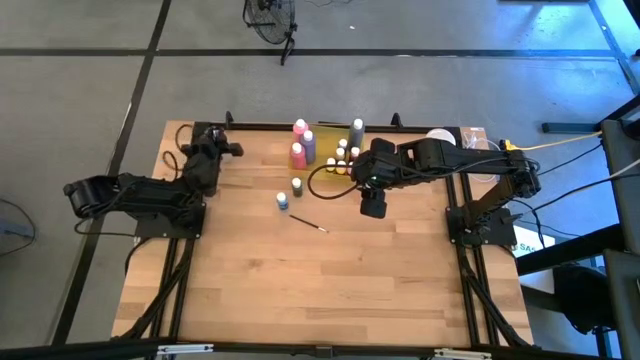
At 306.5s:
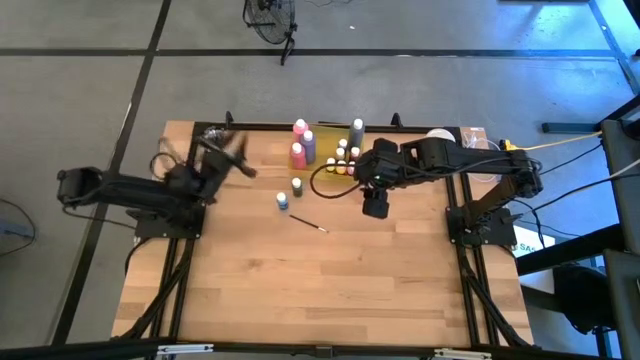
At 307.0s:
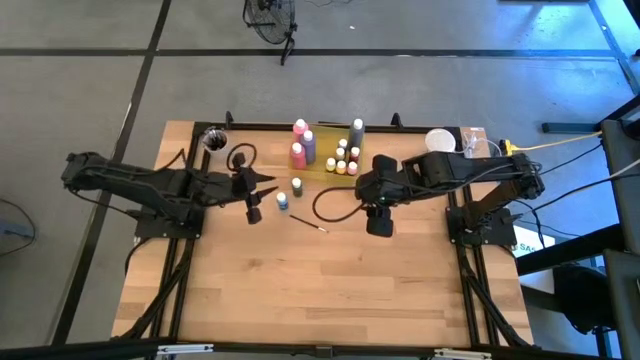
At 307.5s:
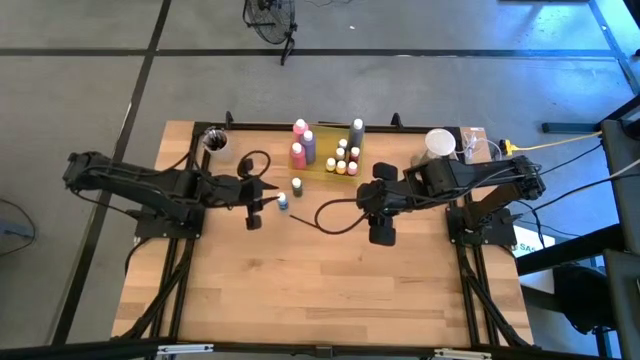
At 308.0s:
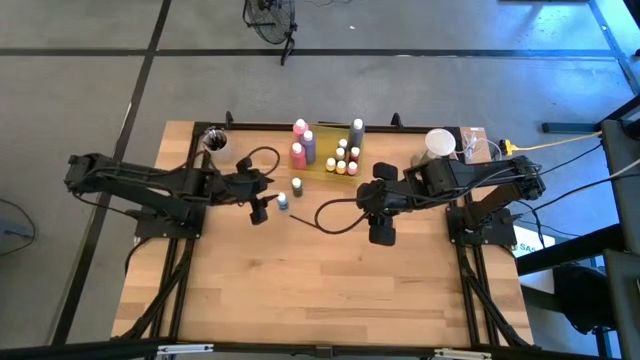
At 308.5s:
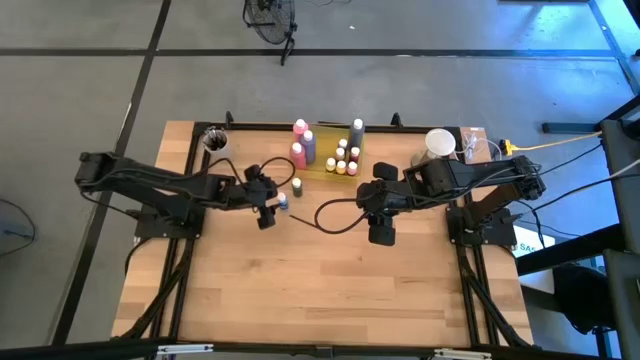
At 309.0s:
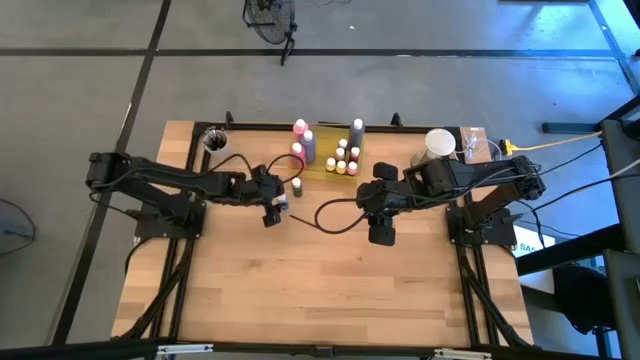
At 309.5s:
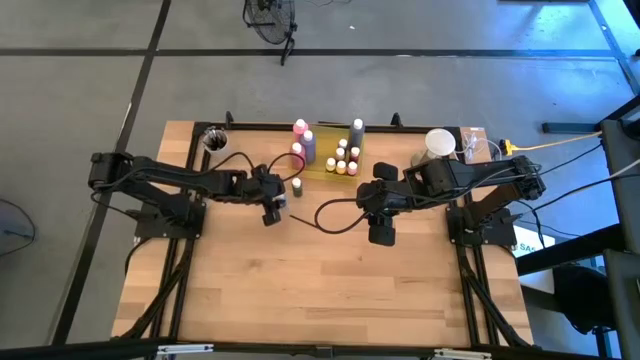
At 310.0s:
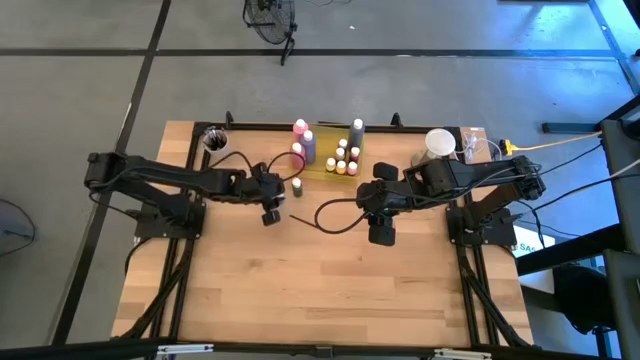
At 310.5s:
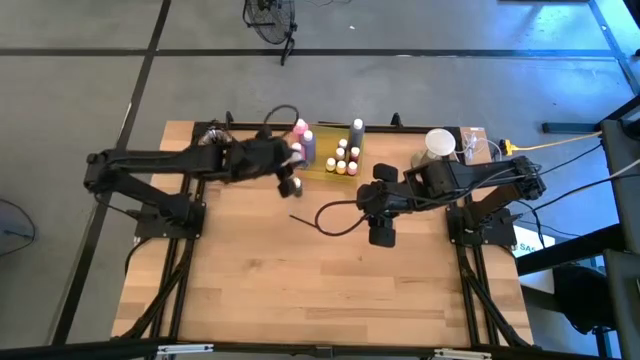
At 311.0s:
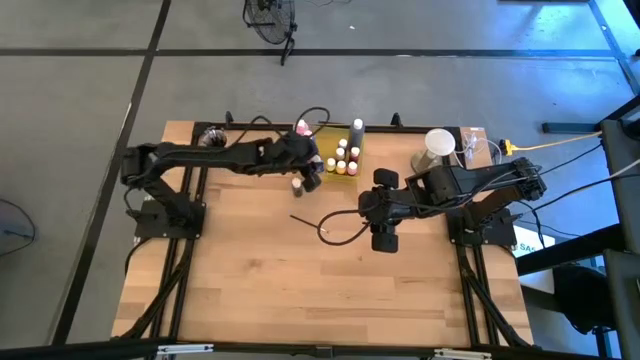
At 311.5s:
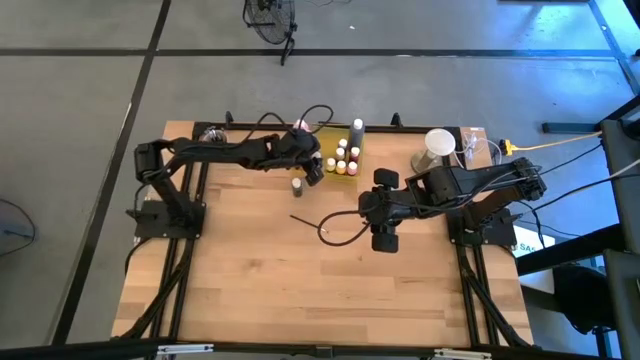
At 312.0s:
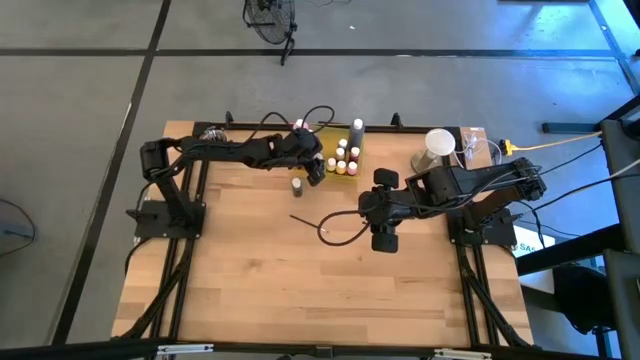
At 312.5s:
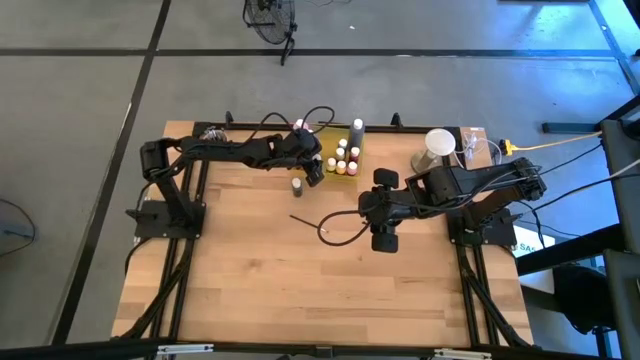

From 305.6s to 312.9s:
Task: Pick & Place Paint Supplies
Put the small light blue paint bottle into the yellow bin

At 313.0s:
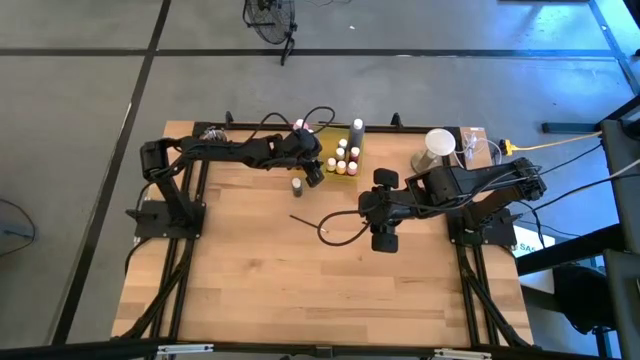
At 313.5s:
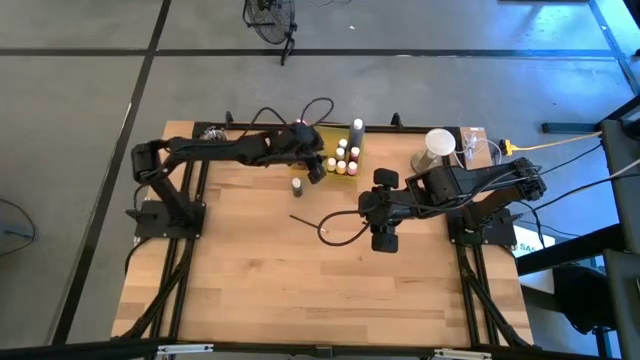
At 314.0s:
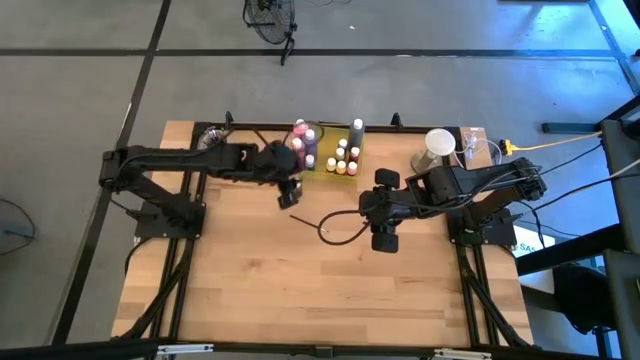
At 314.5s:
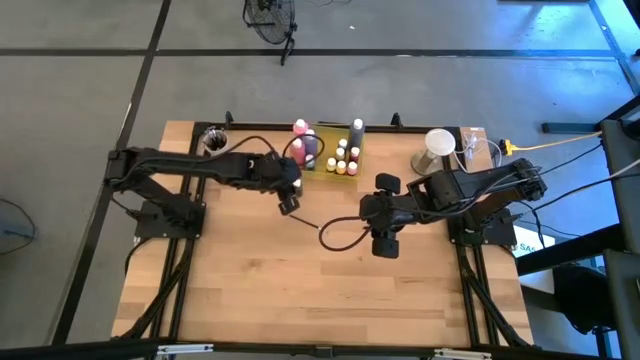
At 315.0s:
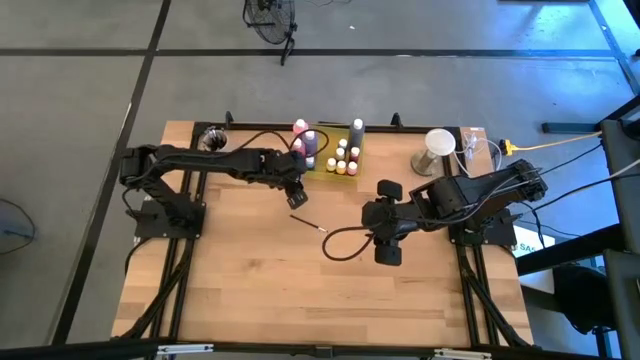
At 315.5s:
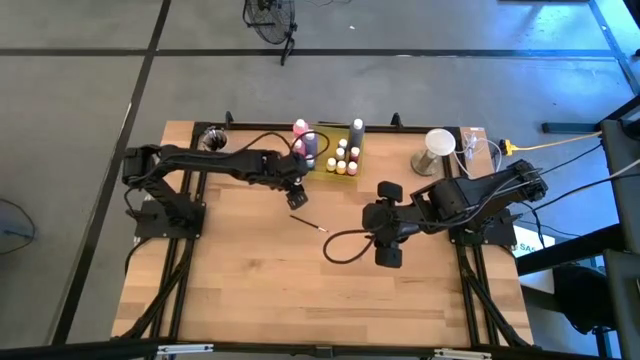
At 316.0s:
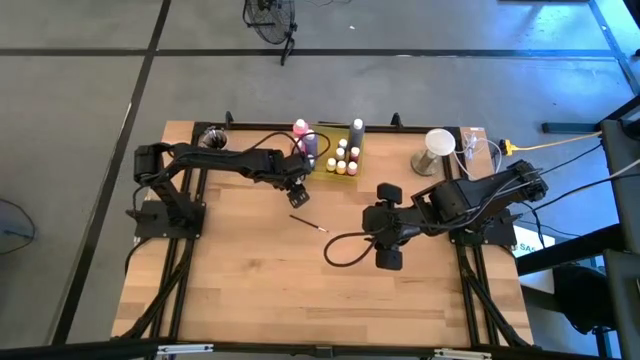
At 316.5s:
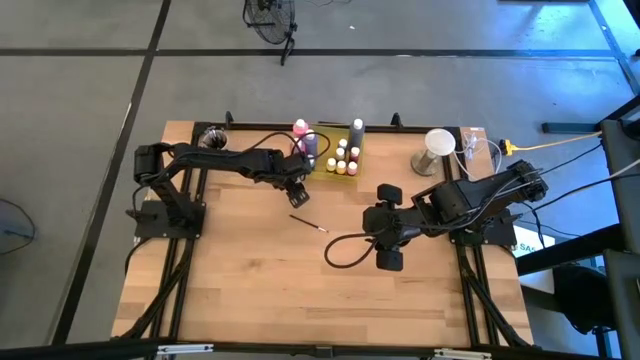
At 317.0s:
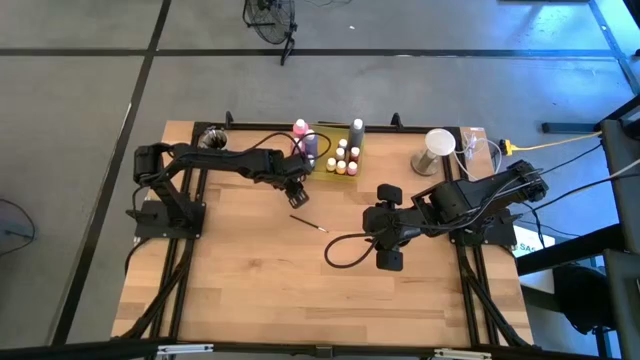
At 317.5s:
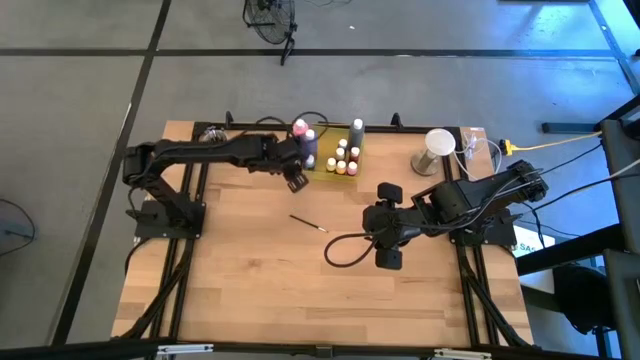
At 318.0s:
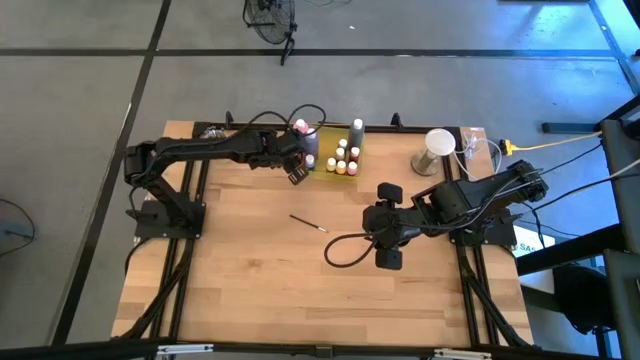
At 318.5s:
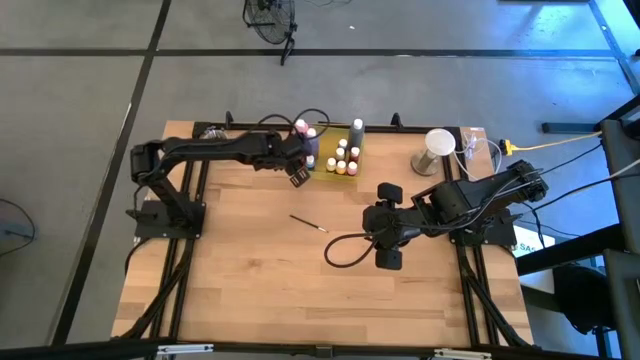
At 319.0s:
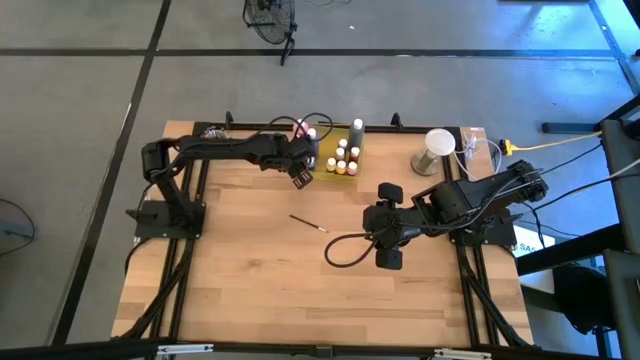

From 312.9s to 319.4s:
Put the small green paint bottle into the yellow bin

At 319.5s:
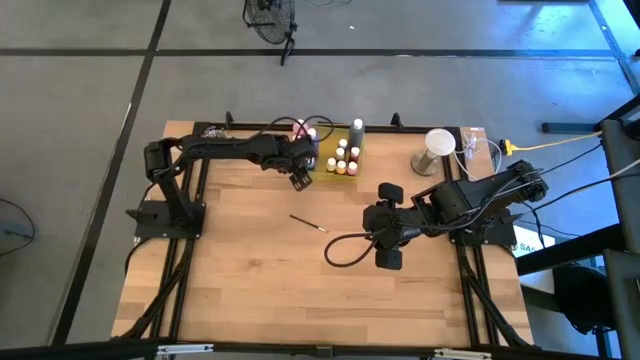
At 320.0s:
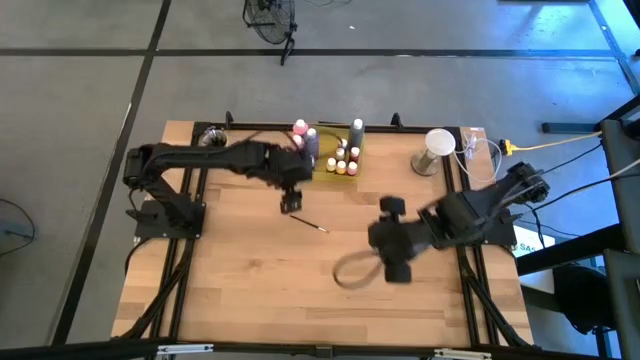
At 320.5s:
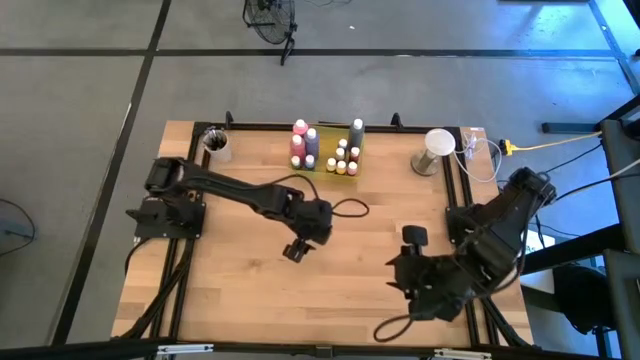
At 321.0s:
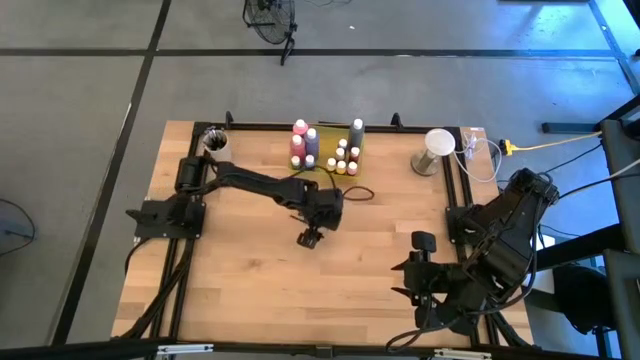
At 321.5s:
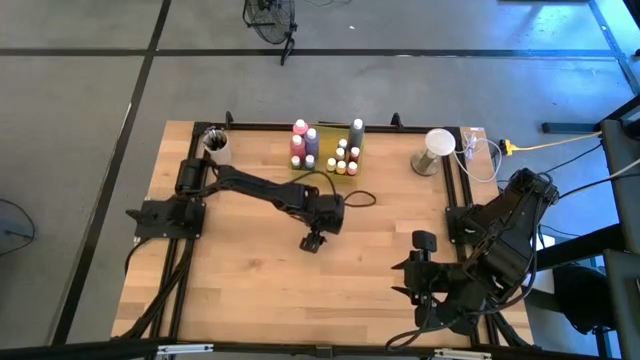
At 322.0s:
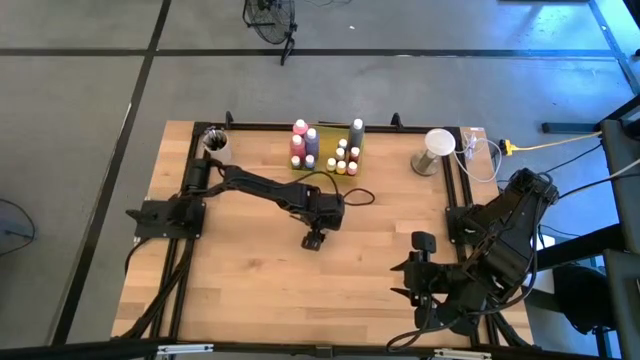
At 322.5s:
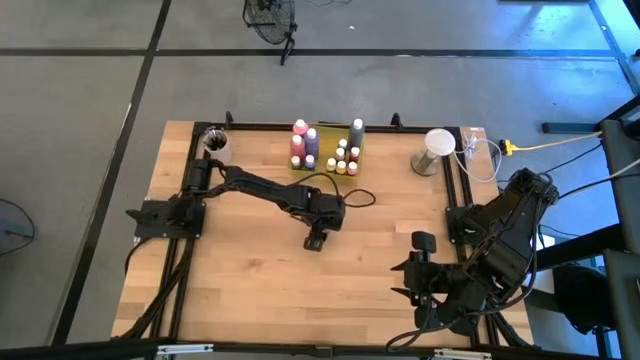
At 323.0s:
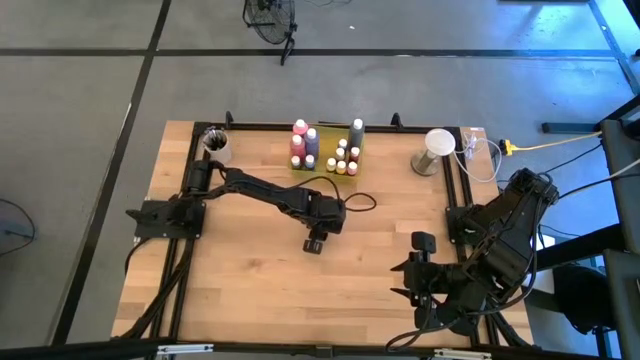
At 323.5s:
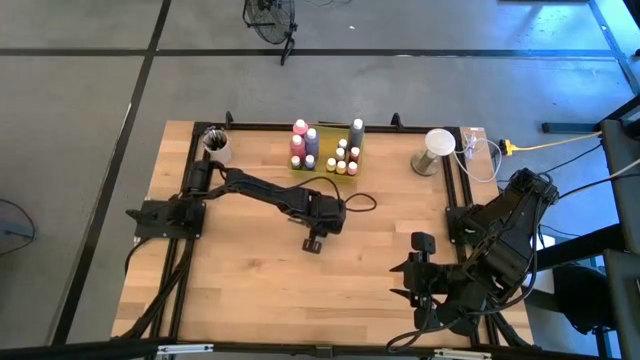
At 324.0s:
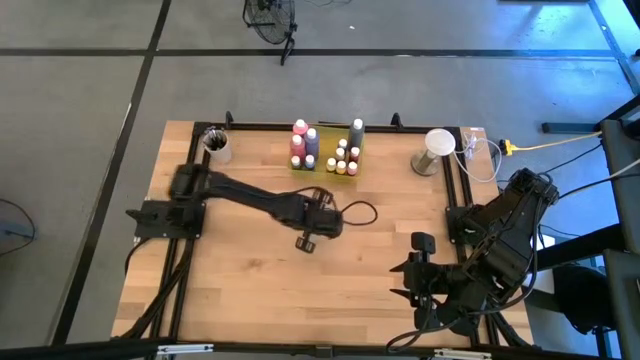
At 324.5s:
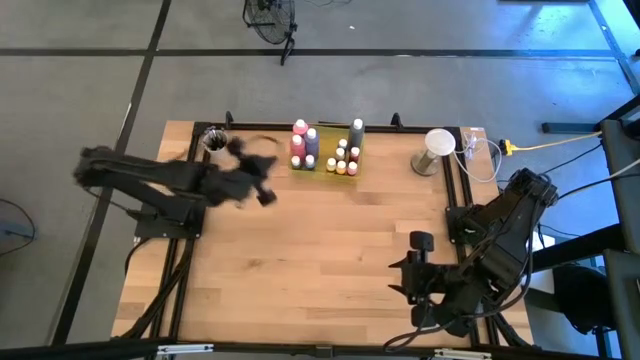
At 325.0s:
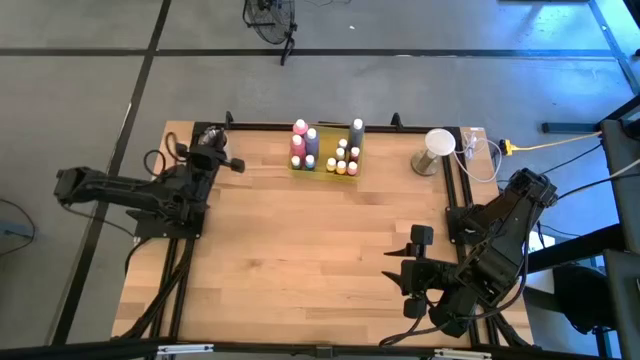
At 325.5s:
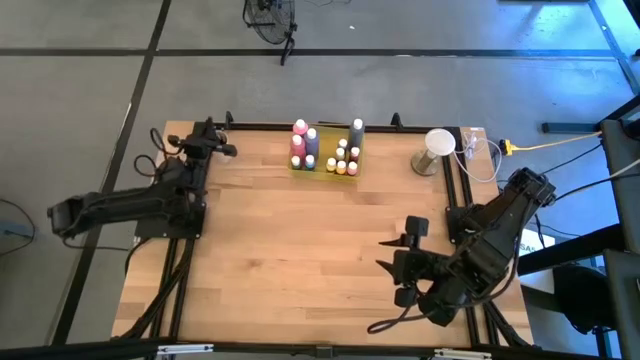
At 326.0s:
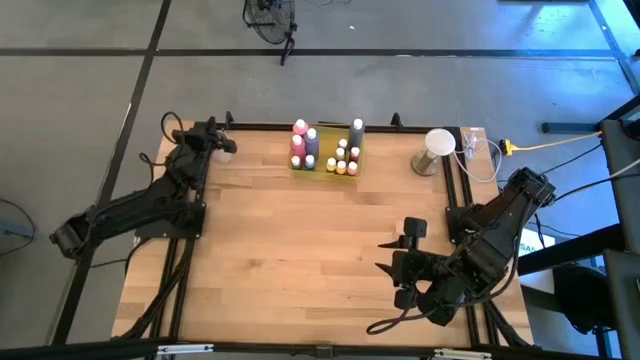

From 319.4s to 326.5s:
Put the silver paintbrush into the white cup

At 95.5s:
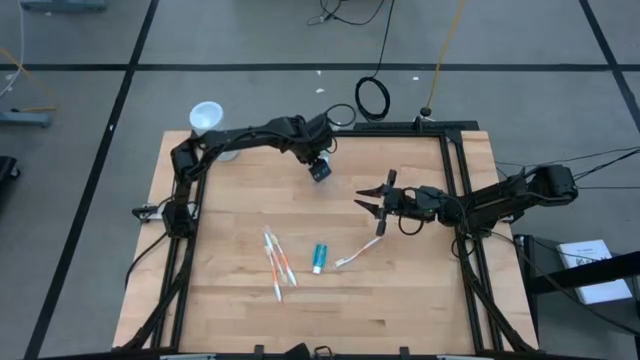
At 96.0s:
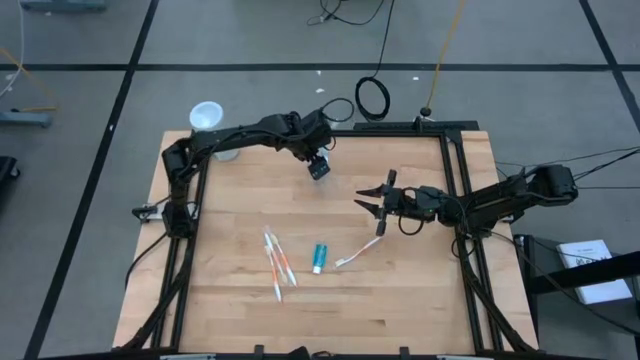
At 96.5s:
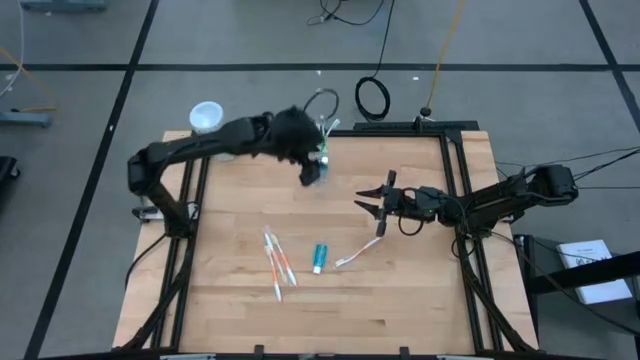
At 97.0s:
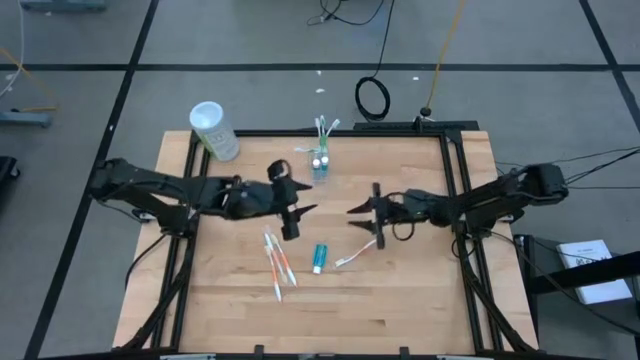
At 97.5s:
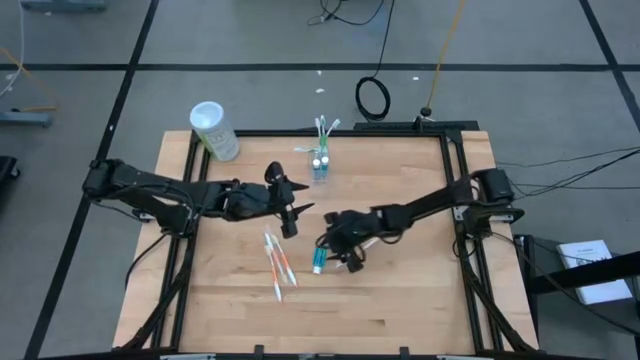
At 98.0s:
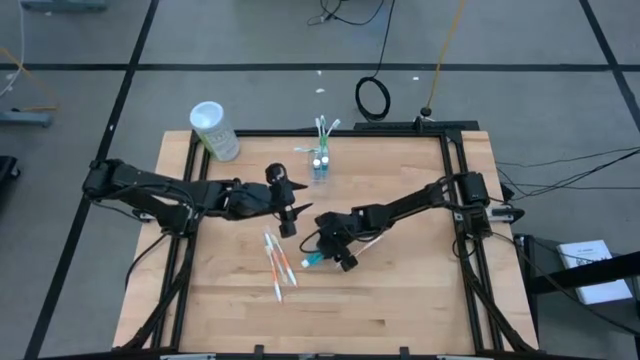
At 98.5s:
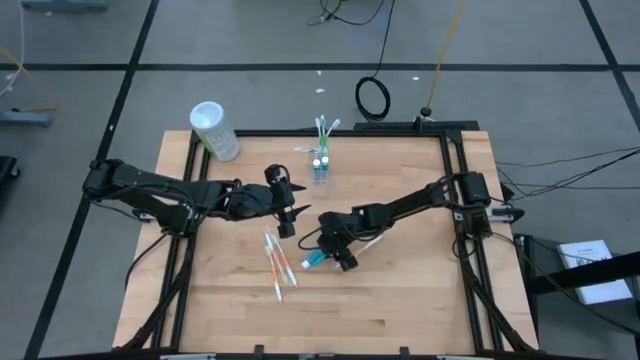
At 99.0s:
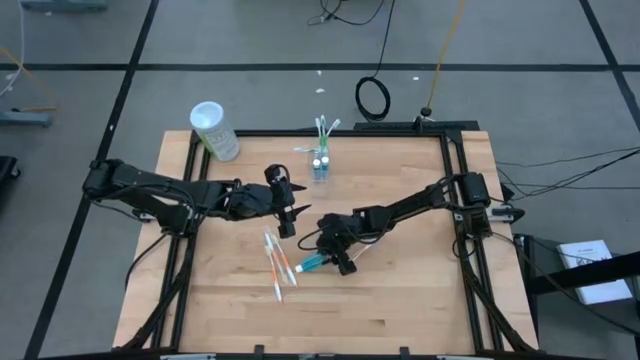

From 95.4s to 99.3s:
Task: Pick & Place toothbrushing station
Put the blue mouthwash bottle into the transparent organizer
